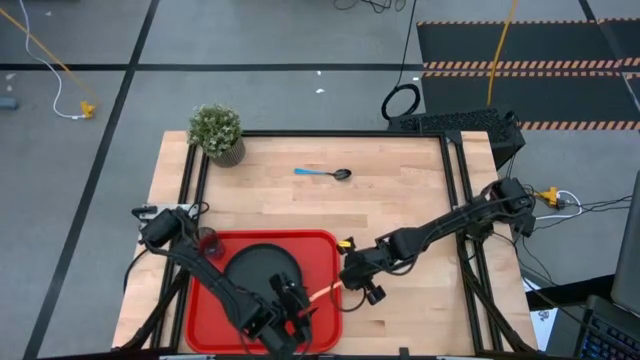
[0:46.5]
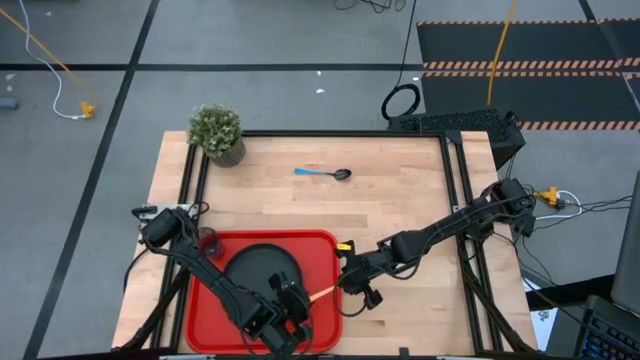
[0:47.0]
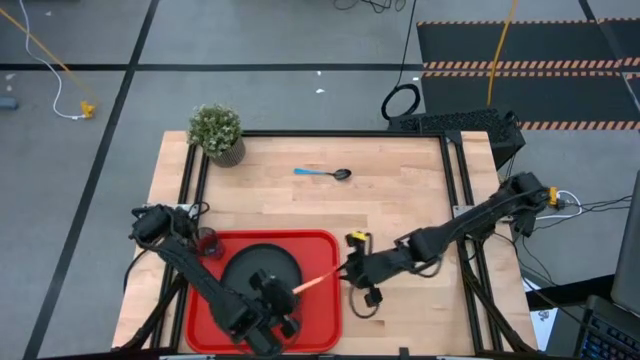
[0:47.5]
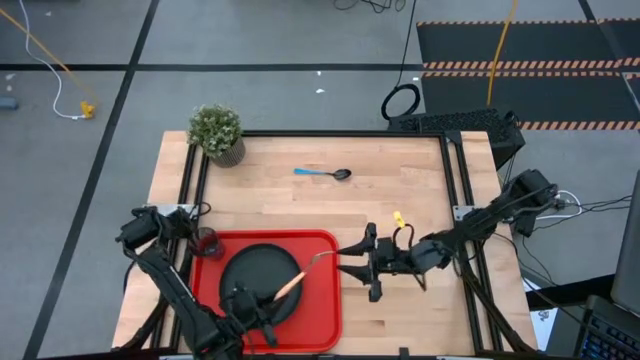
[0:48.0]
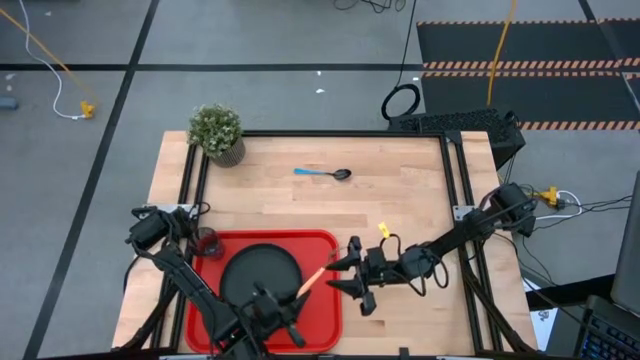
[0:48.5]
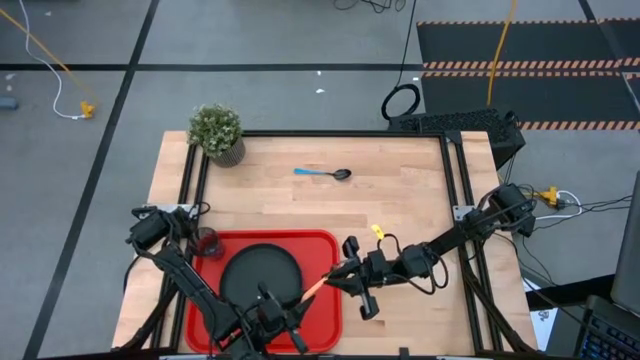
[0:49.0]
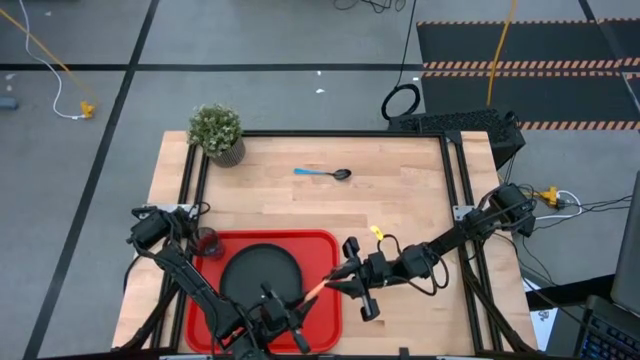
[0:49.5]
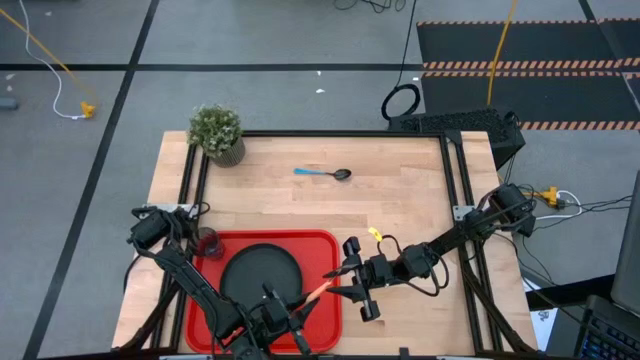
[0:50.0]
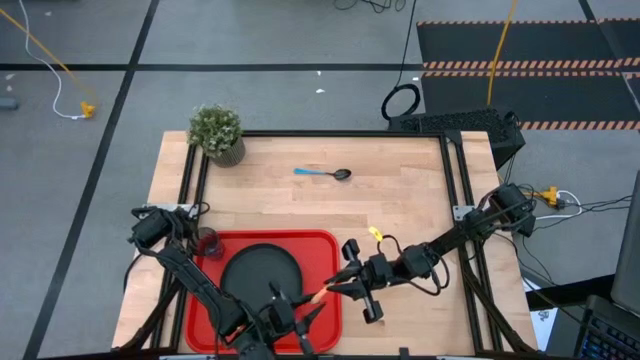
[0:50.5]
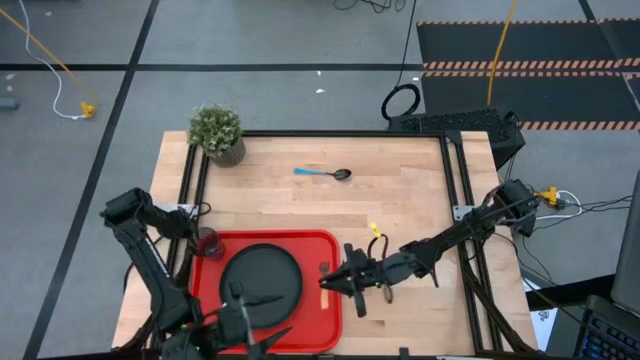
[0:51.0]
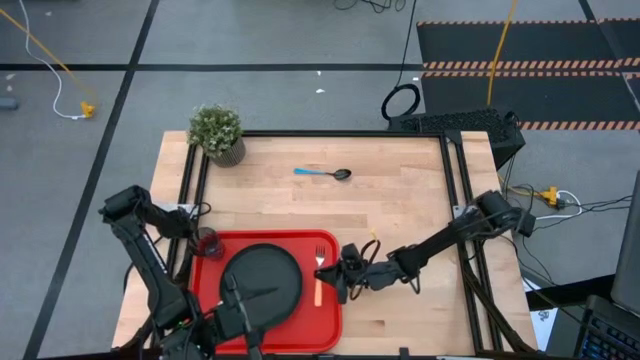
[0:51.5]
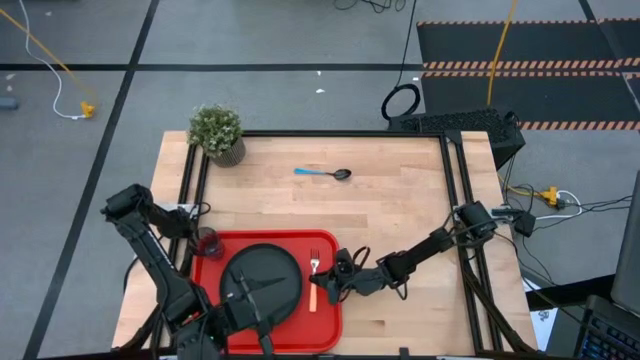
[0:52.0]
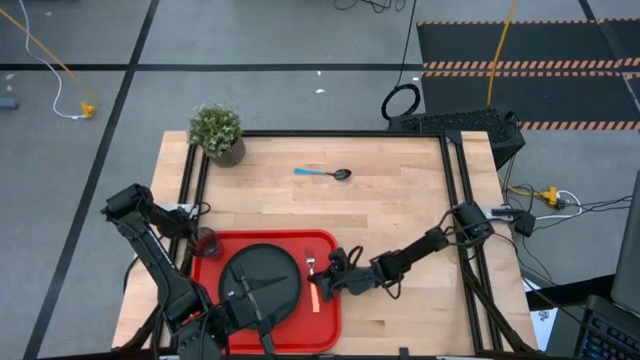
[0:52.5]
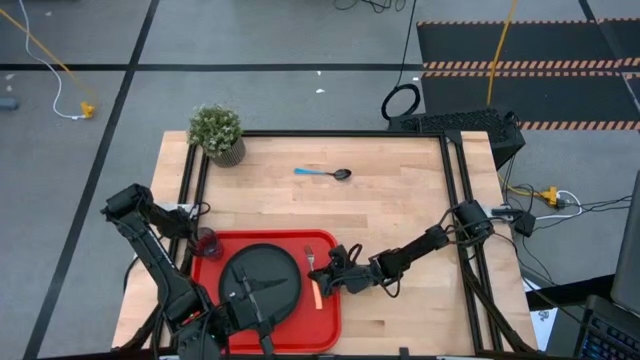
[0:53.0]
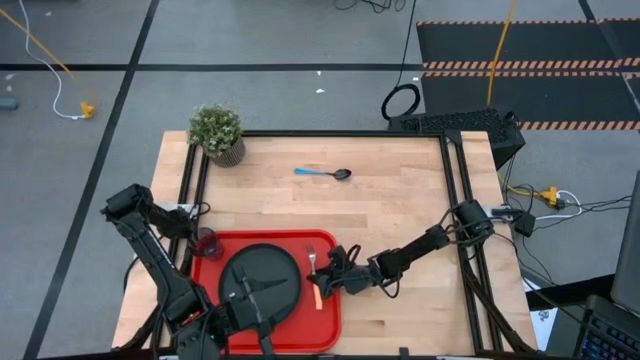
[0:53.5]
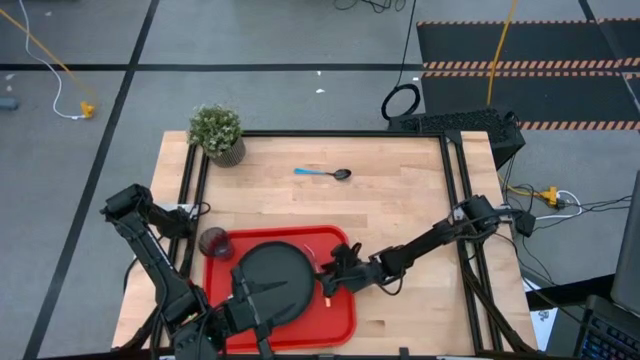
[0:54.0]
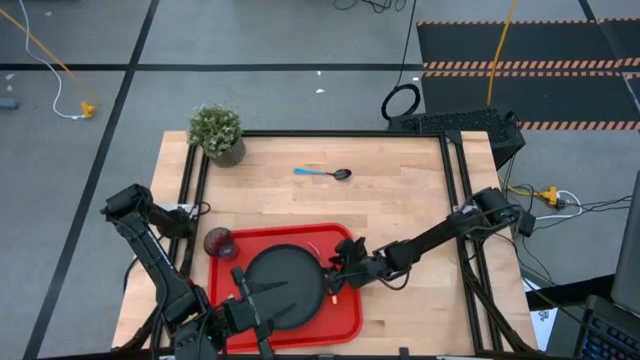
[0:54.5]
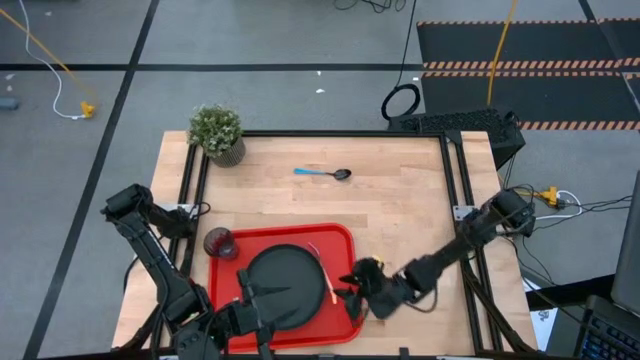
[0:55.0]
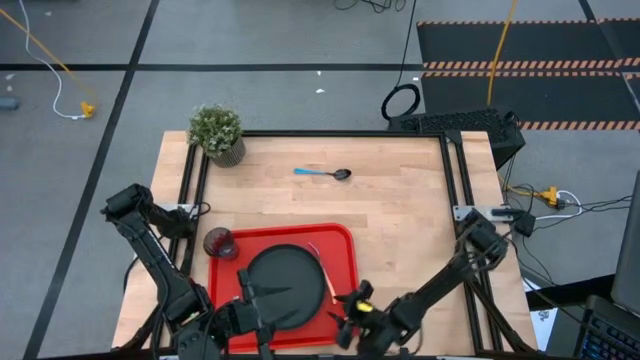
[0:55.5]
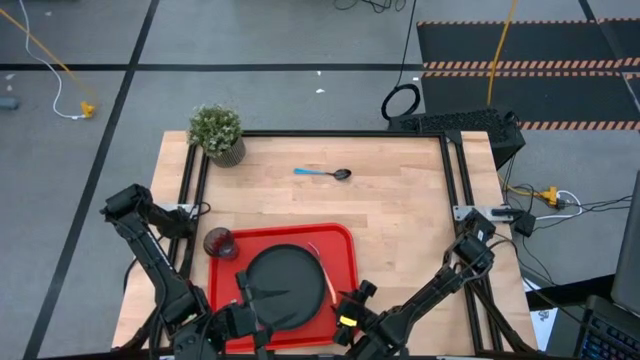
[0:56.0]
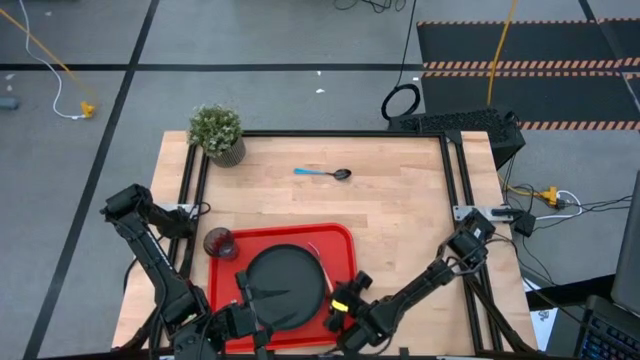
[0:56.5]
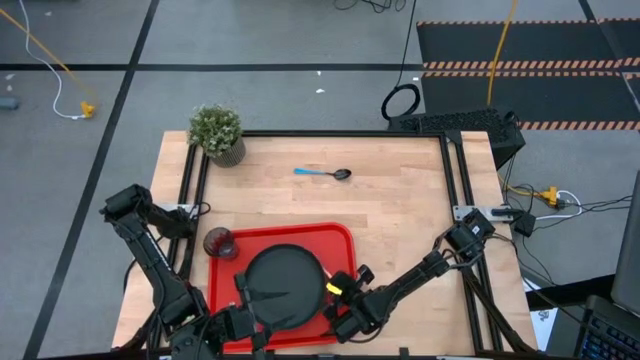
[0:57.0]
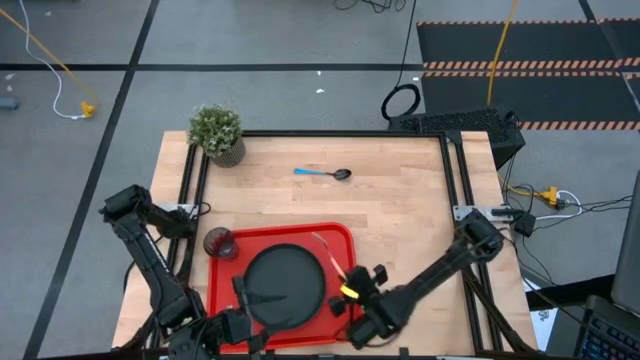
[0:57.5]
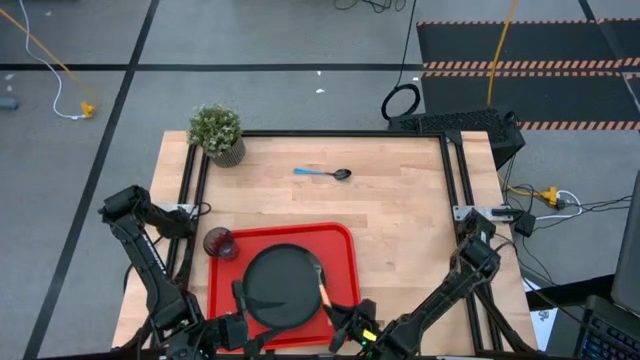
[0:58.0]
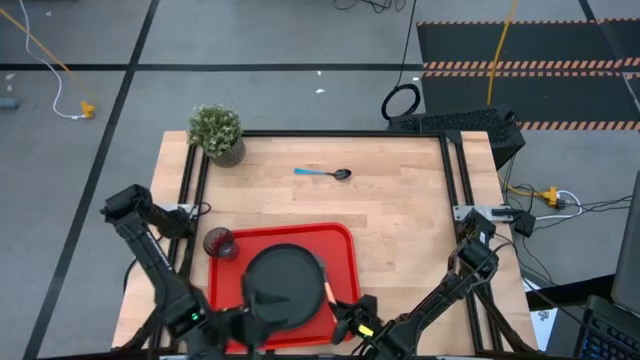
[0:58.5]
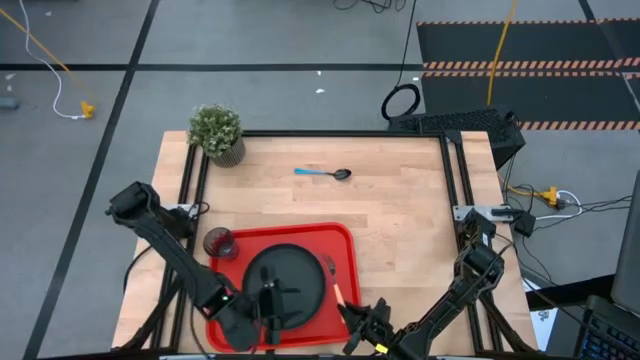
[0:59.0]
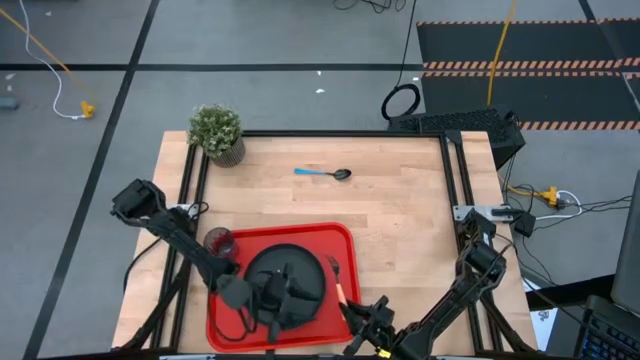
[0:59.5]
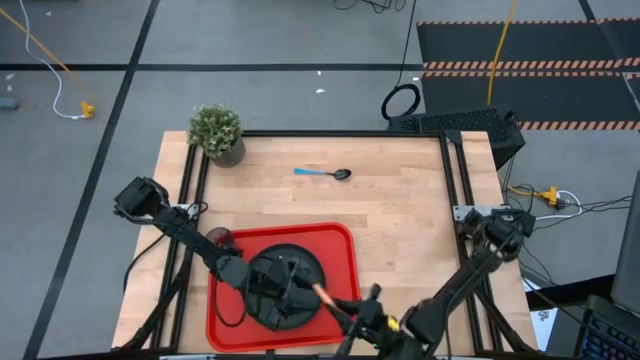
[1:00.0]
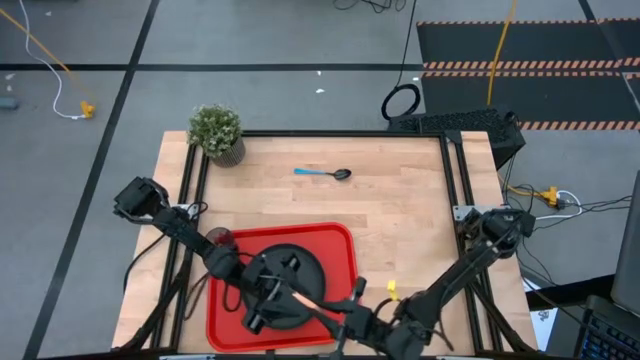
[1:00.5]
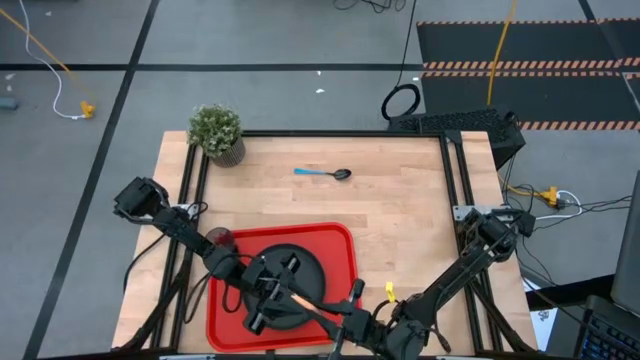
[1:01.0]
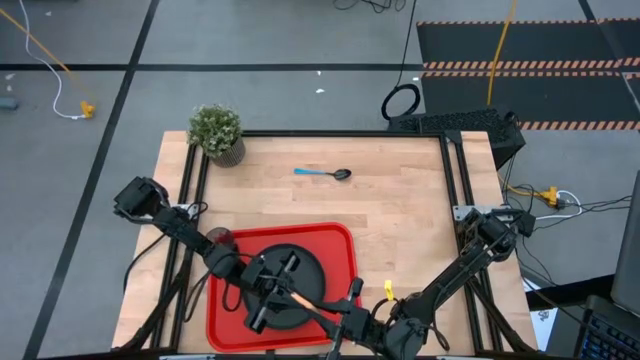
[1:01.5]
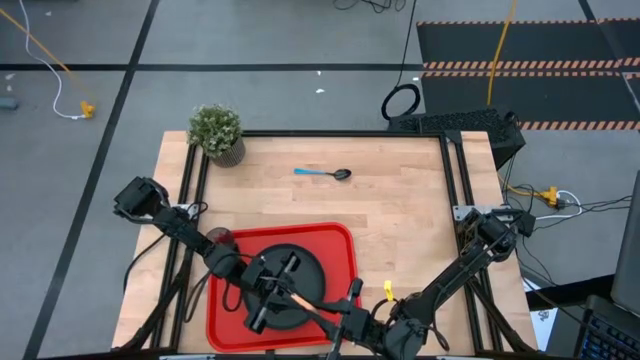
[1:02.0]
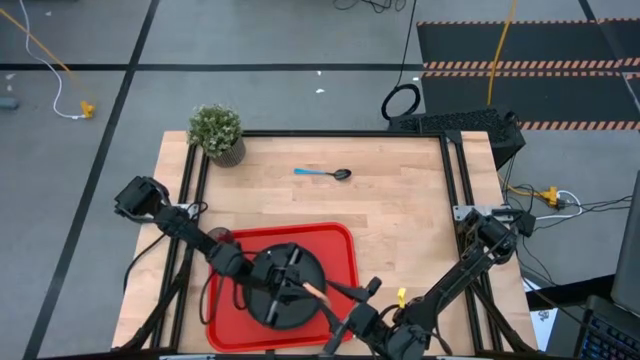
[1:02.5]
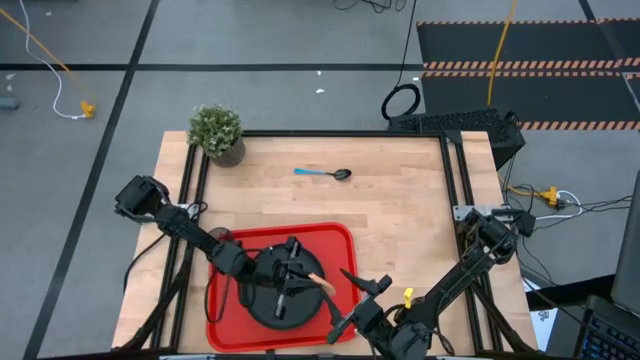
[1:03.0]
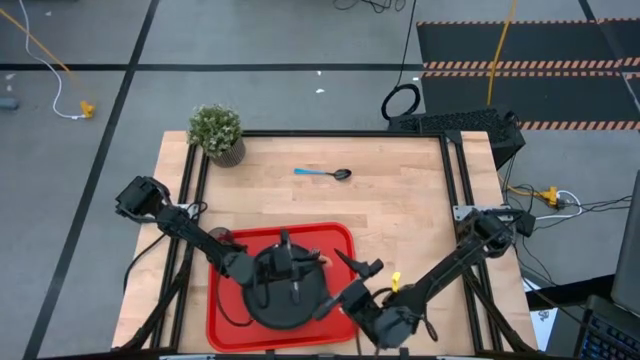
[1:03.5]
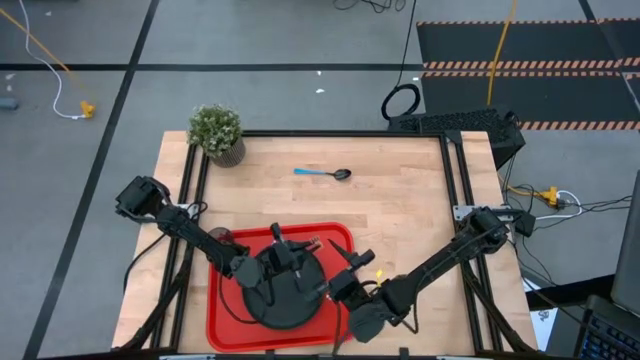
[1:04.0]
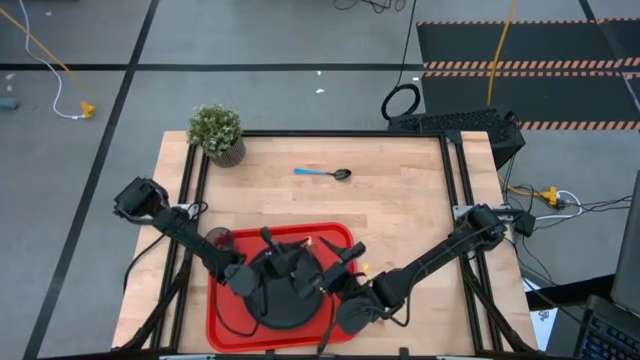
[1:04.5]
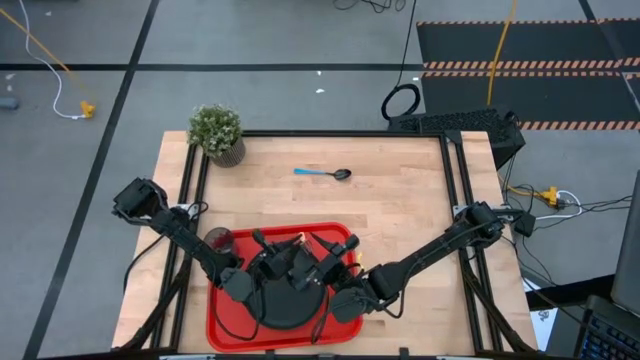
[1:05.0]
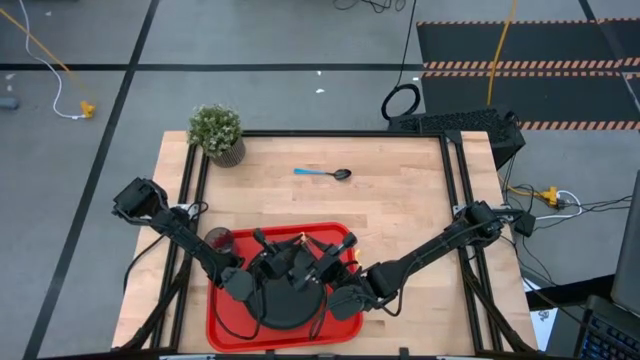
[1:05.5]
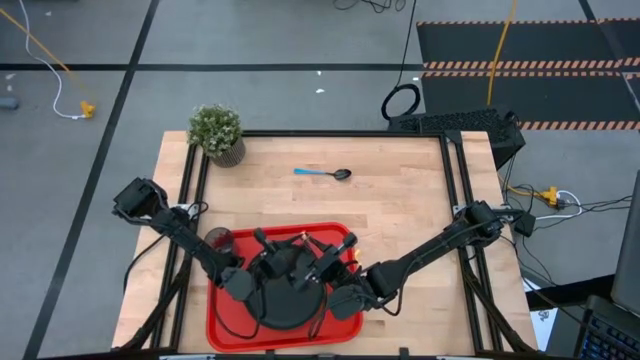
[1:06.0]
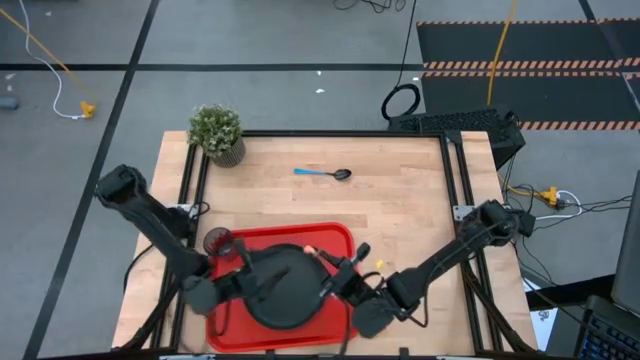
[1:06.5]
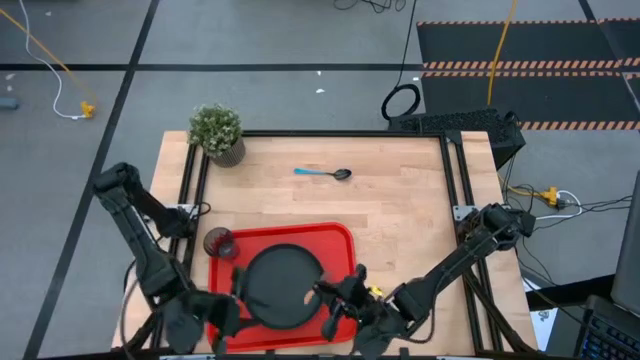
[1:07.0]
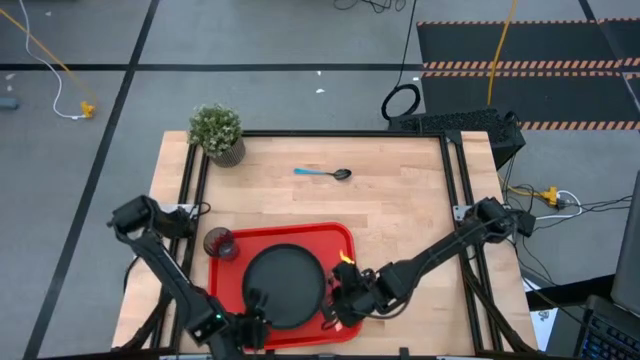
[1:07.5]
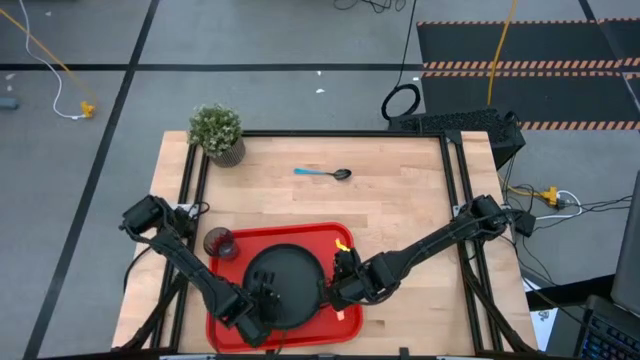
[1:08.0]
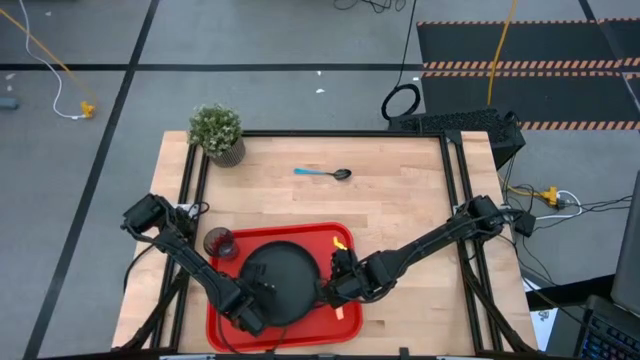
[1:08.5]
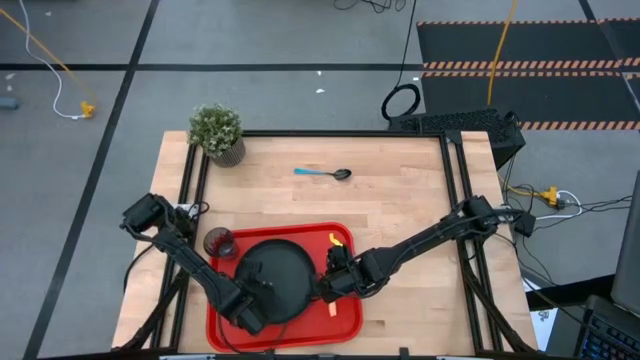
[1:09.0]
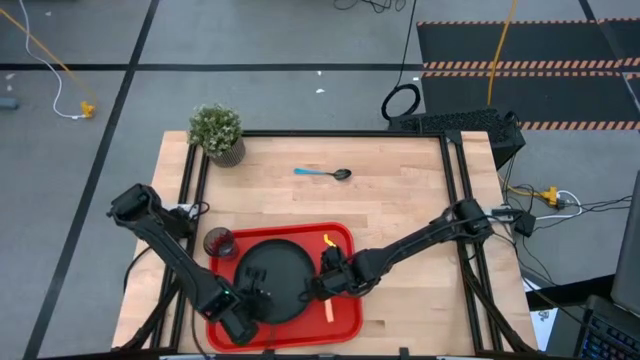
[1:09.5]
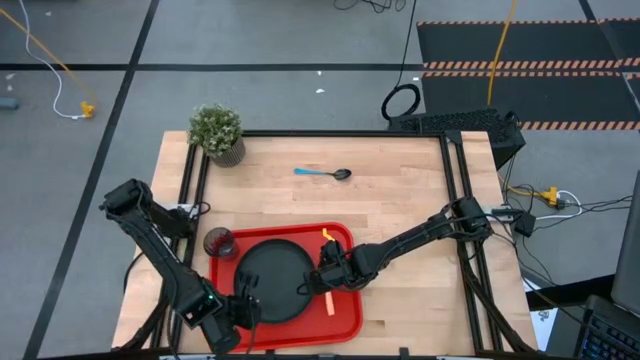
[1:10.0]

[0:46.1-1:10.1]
Task: Pick and place plate/cup/fork/spoon on tray
Put the orange fork on the red serving tray on the right side of the black plate
